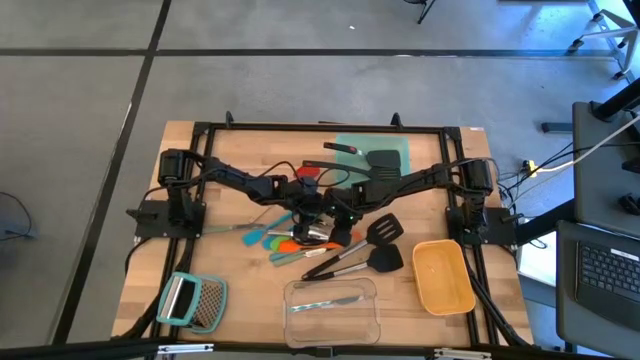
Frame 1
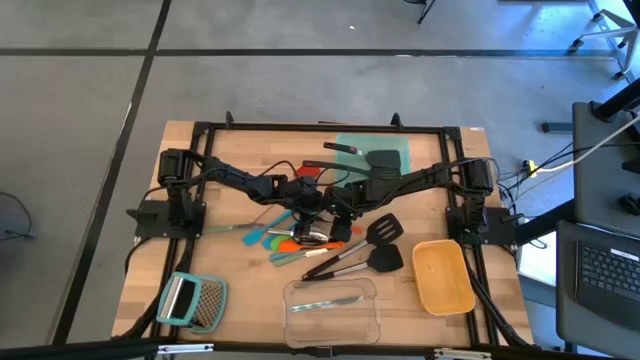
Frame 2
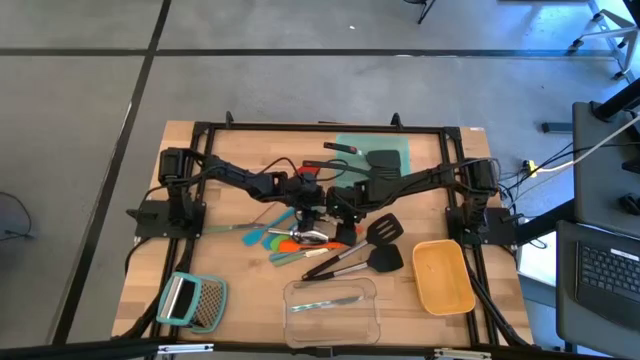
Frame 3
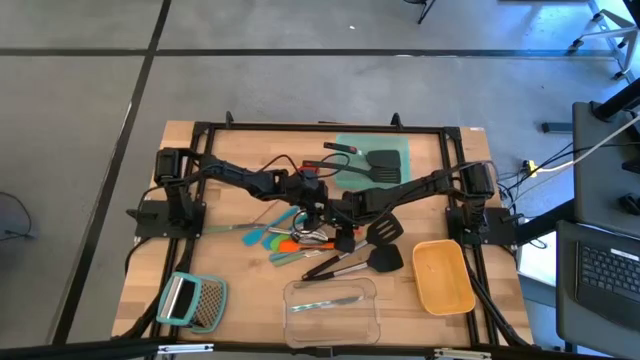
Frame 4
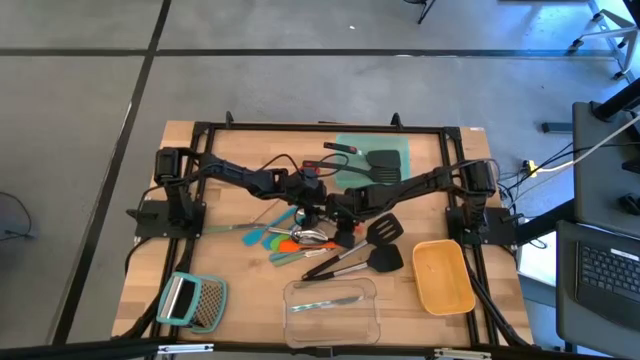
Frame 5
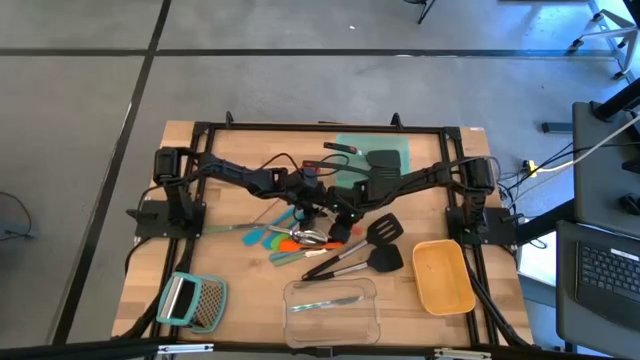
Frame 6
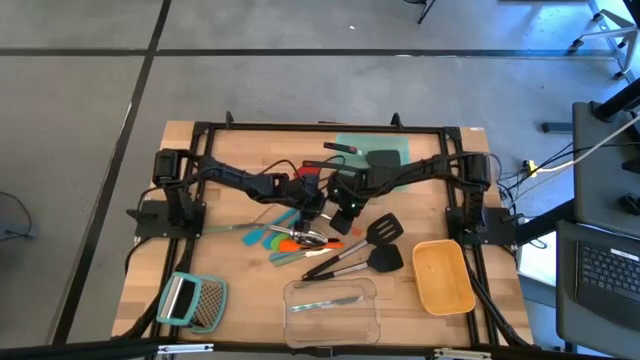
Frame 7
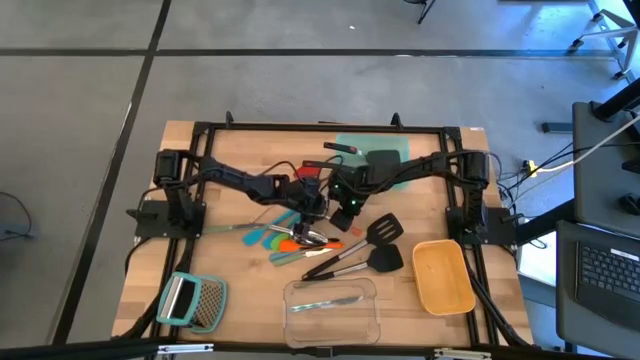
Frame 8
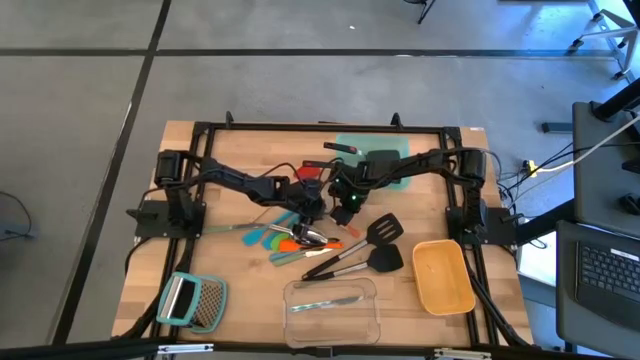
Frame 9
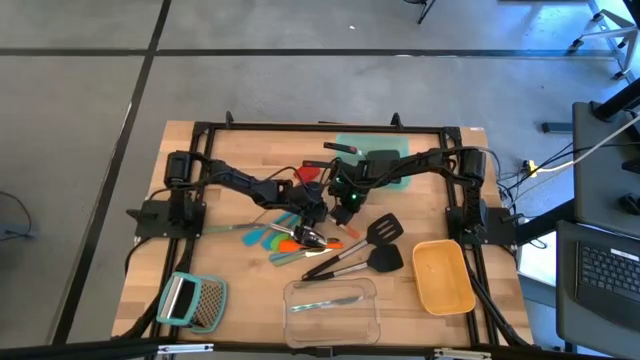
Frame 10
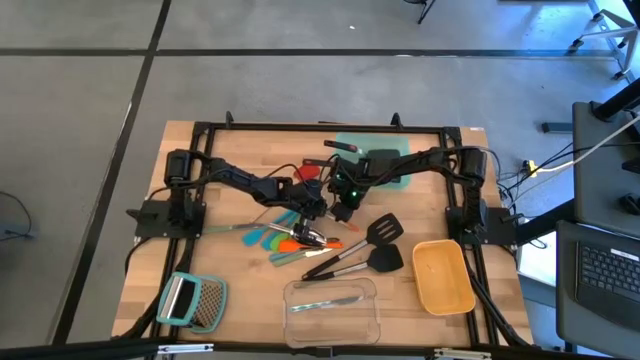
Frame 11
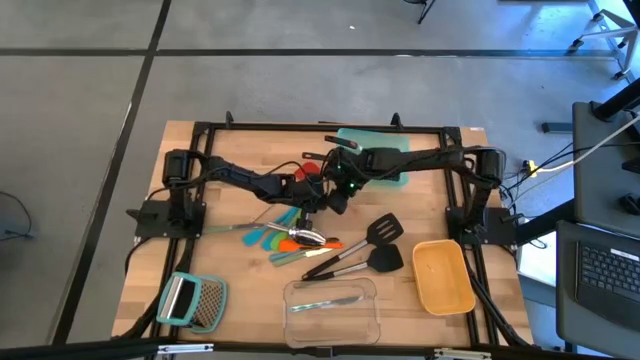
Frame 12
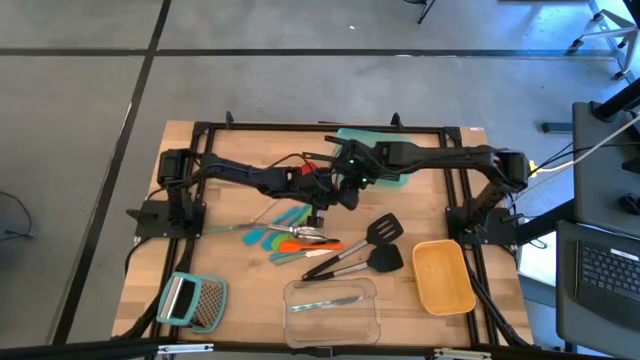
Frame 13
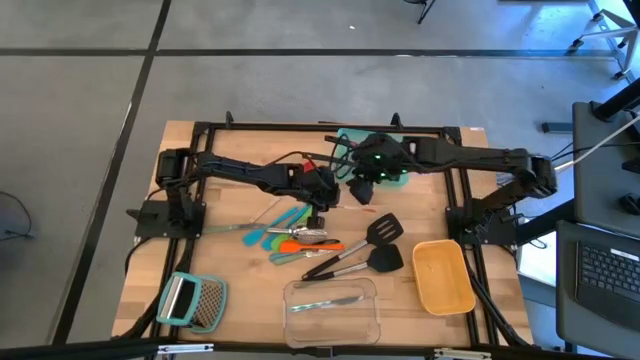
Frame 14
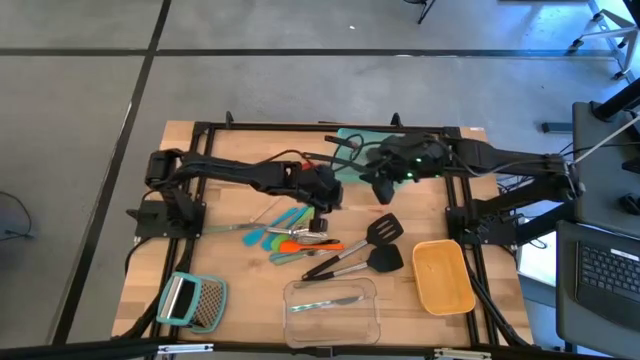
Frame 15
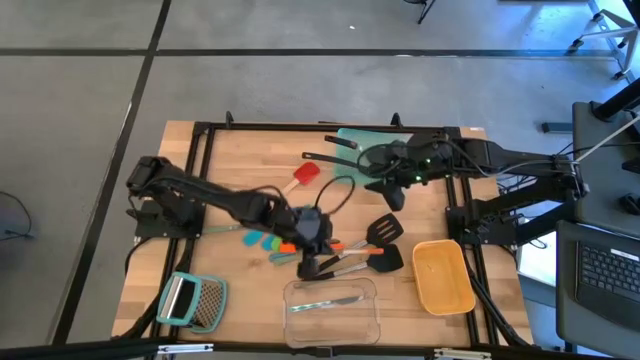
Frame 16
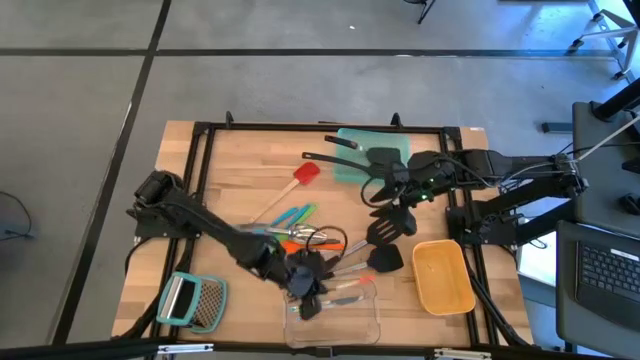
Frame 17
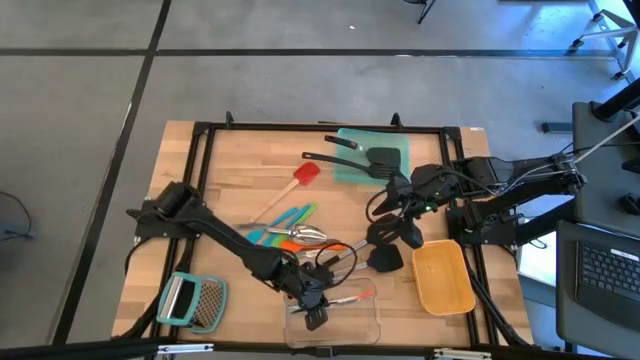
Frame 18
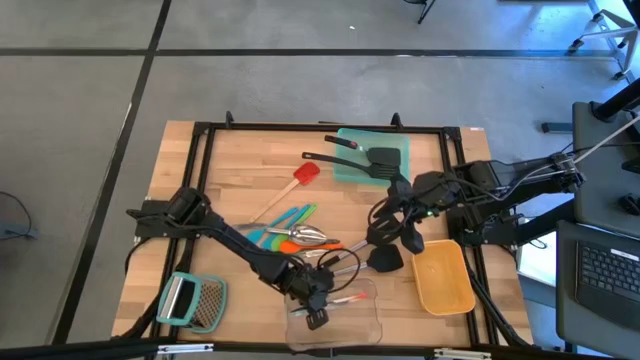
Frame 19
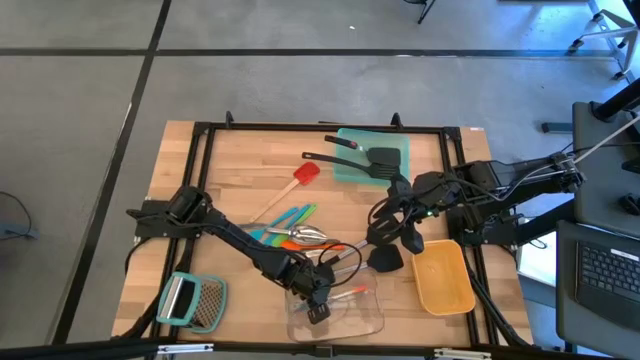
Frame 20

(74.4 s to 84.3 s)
Task: Pick & Place Kitchen Items
Put the orange table knife into the transparent bin

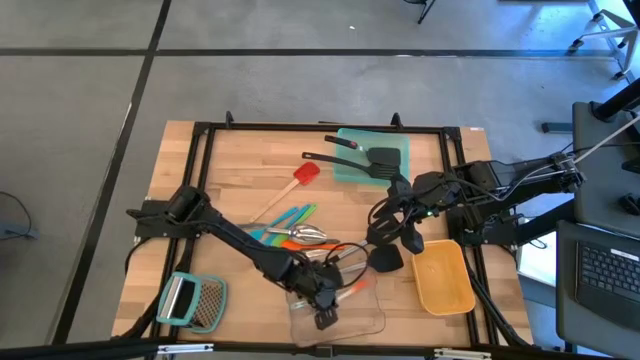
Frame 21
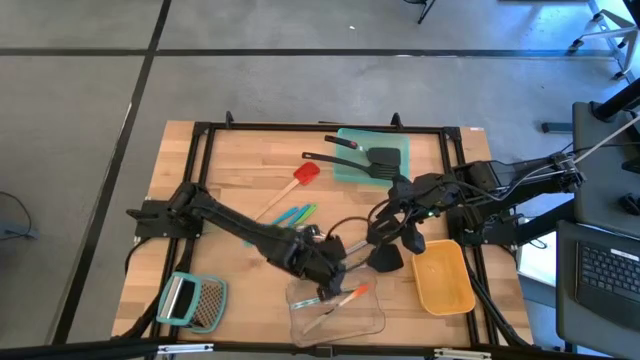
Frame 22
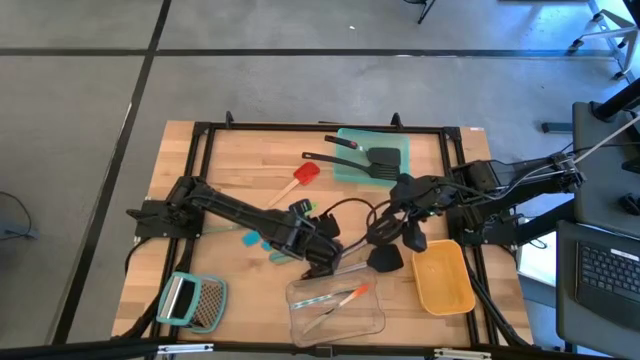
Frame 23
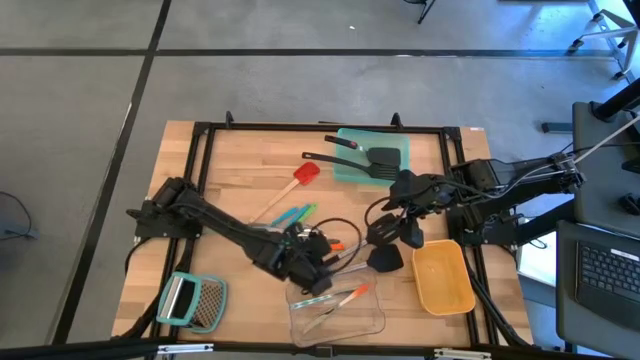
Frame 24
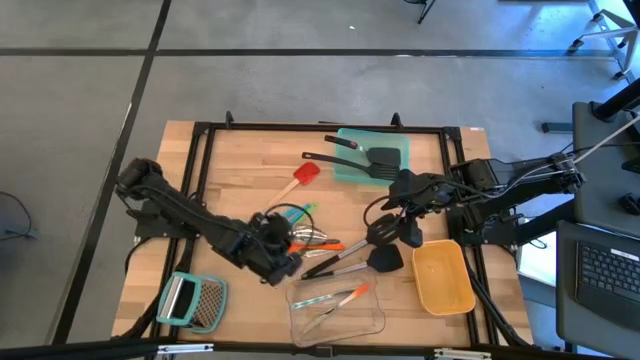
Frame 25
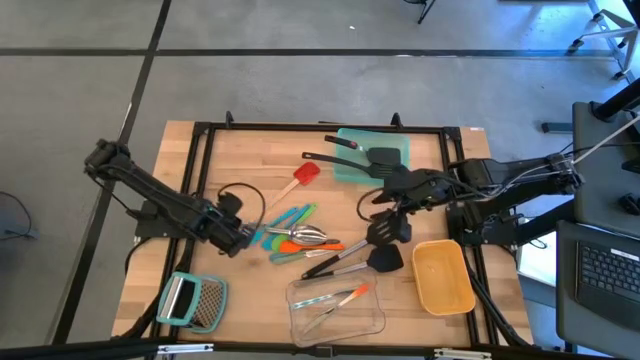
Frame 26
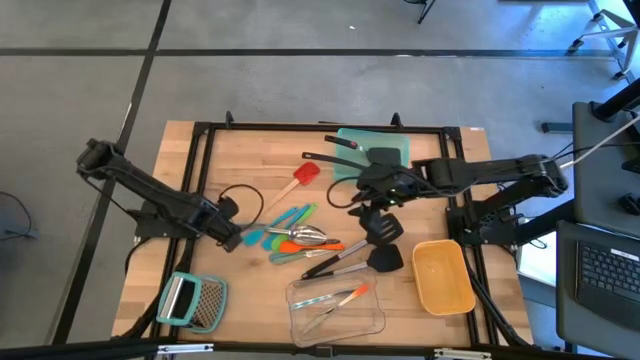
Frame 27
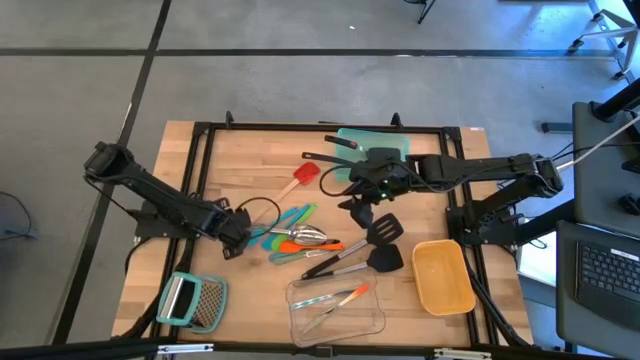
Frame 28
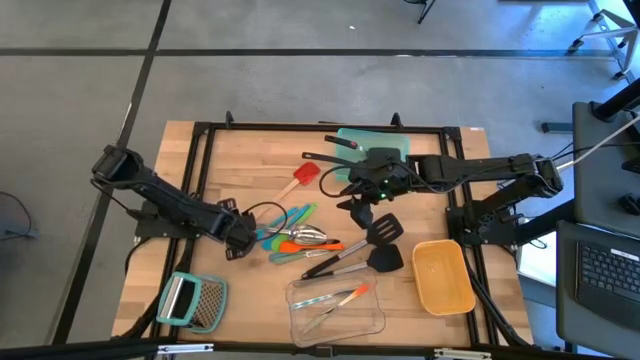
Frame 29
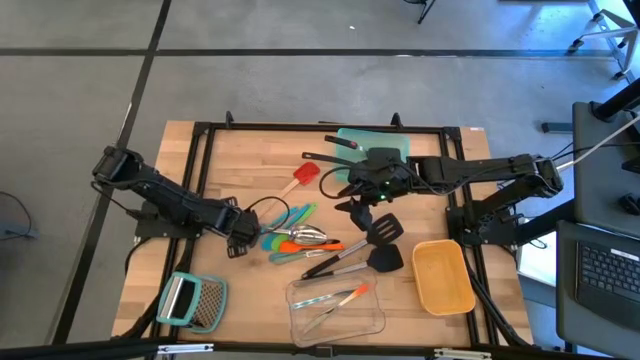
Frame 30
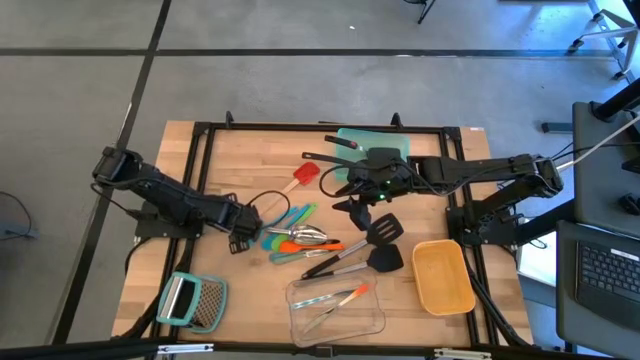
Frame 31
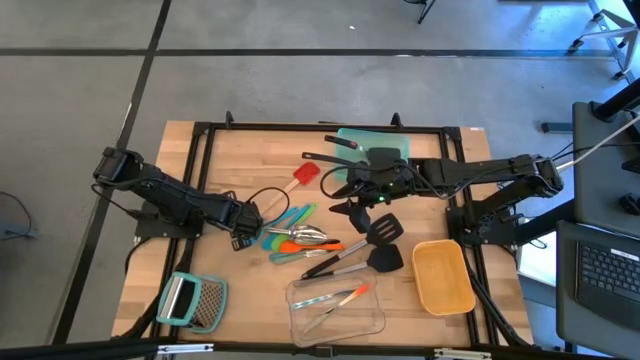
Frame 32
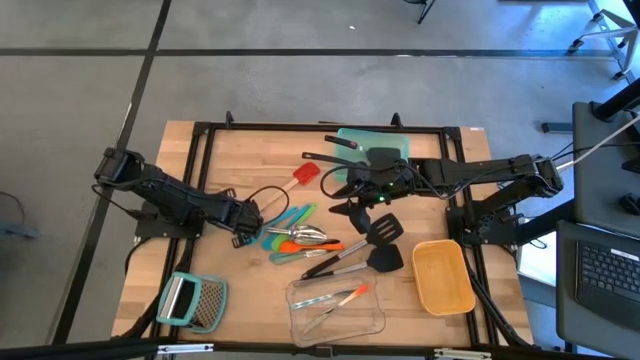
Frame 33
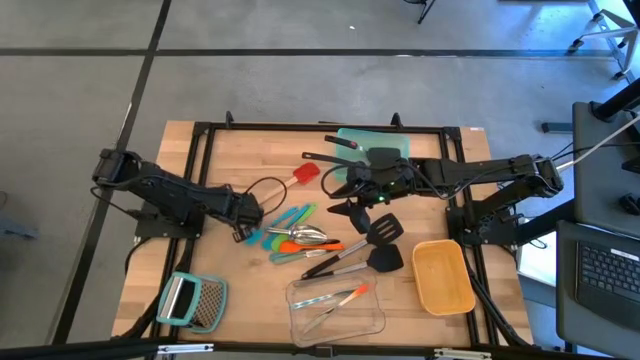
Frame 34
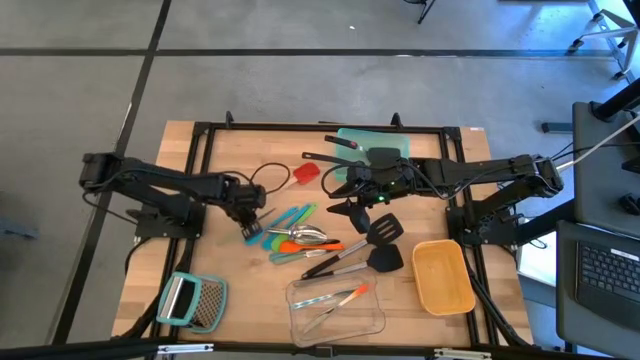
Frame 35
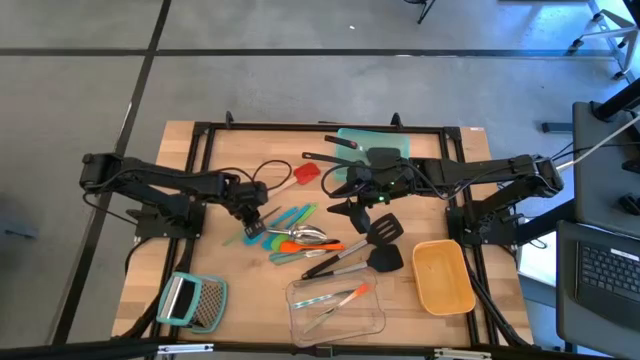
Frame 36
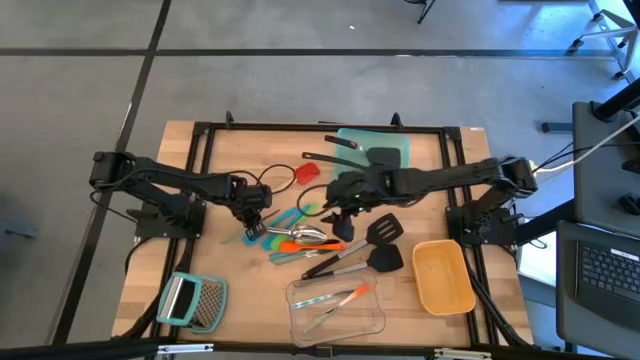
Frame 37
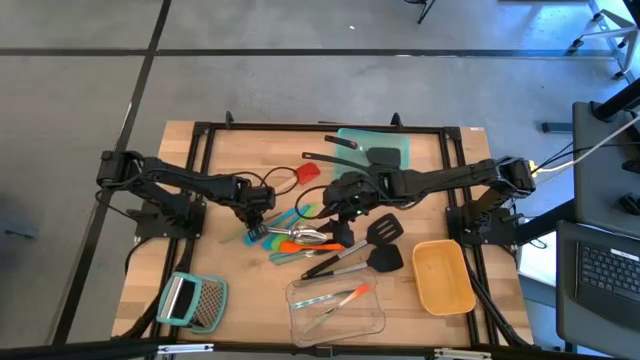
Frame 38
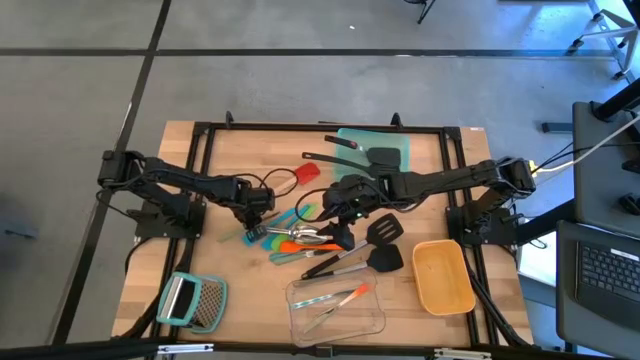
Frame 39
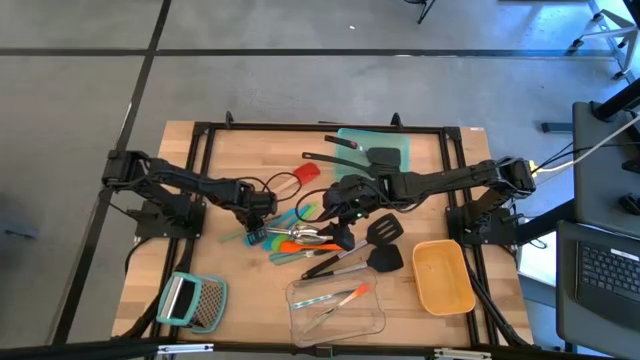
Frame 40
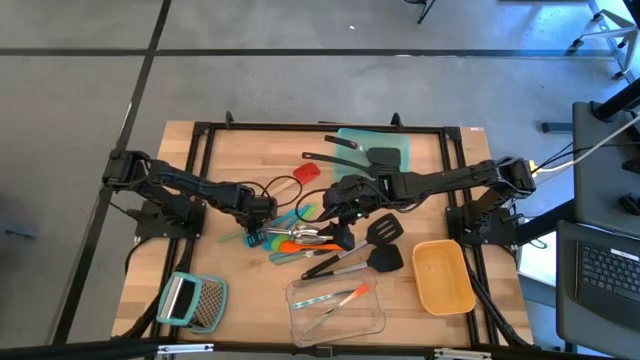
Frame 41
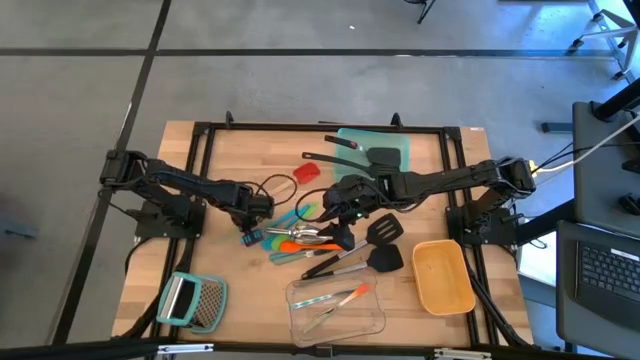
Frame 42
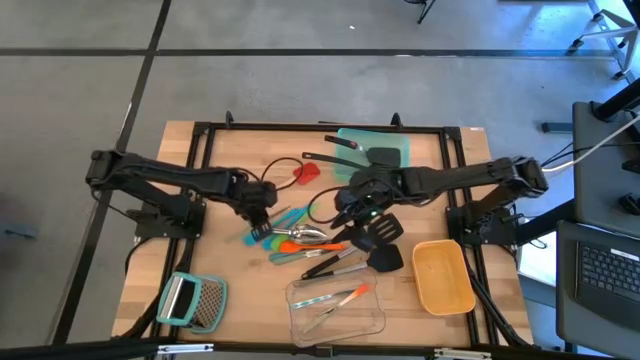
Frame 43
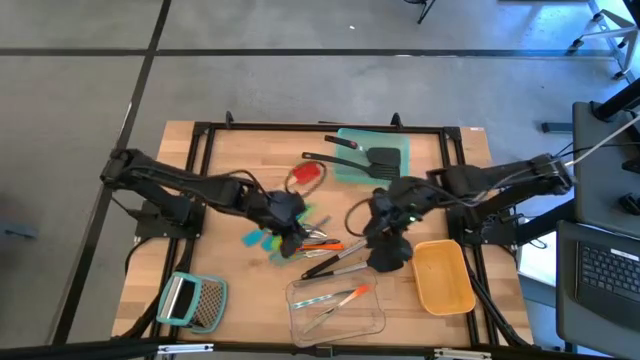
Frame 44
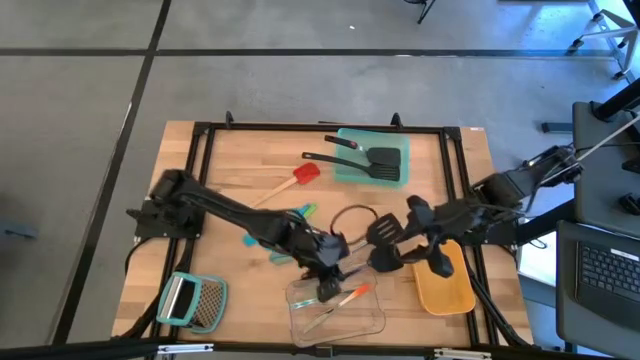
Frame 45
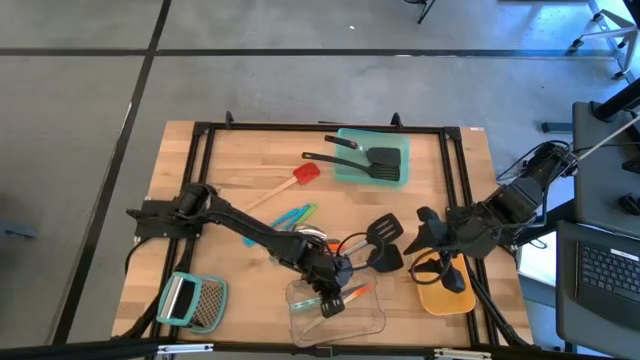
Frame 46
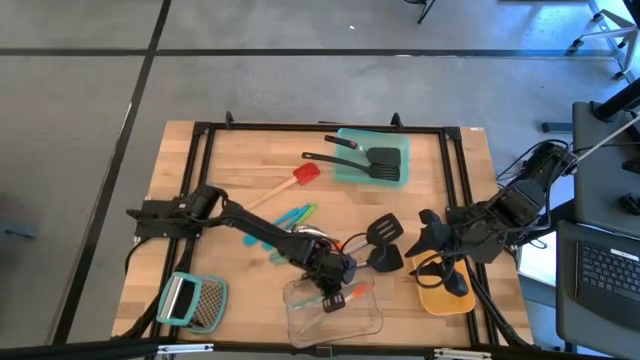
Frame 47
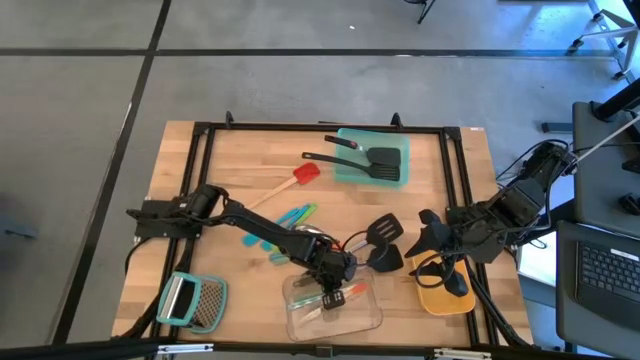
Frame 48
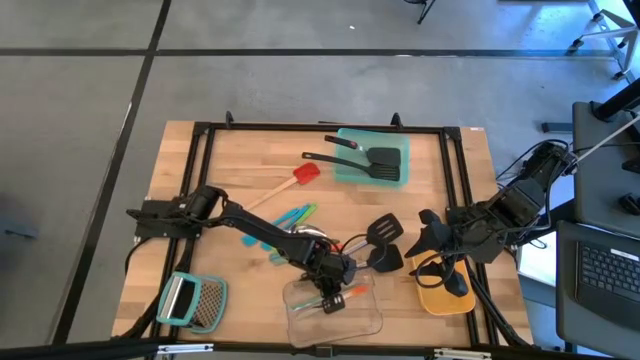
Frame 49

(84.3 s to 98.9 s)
Put the green table knife into the transparent bin
